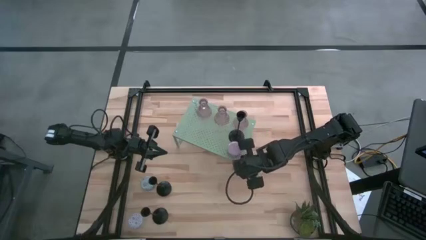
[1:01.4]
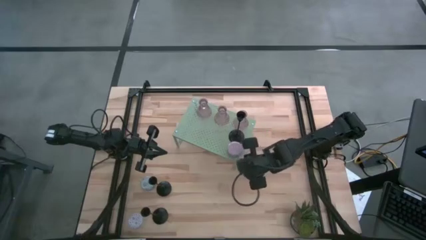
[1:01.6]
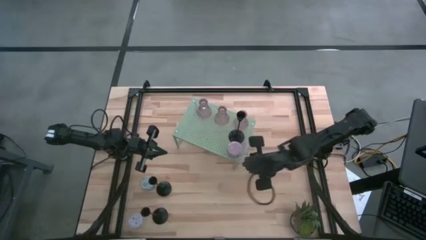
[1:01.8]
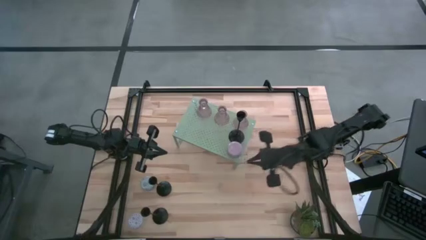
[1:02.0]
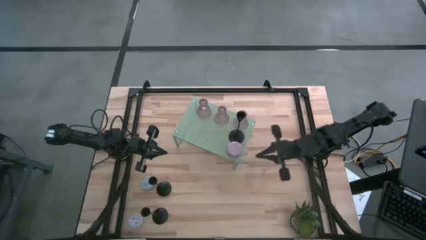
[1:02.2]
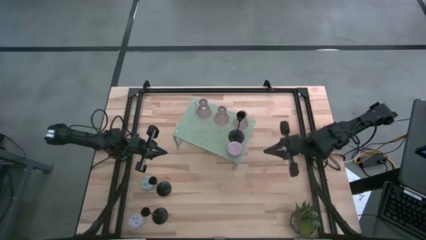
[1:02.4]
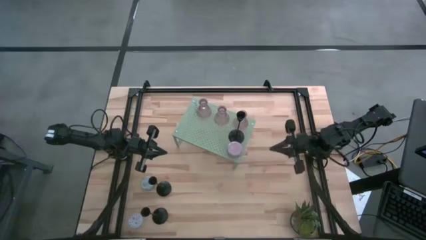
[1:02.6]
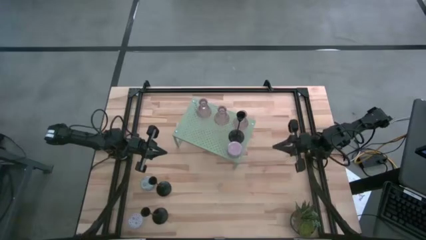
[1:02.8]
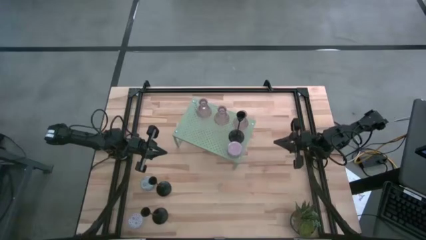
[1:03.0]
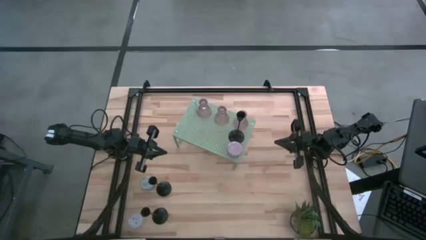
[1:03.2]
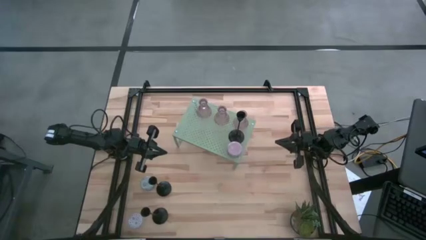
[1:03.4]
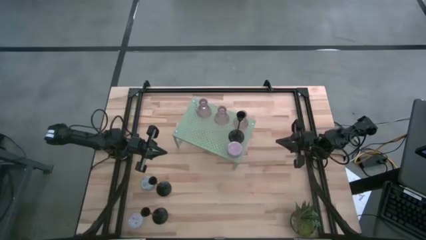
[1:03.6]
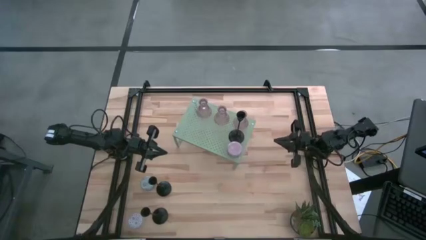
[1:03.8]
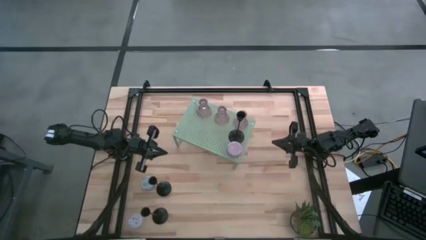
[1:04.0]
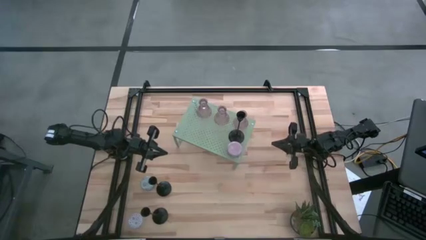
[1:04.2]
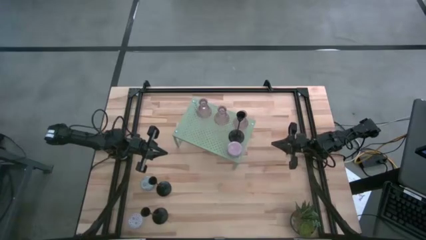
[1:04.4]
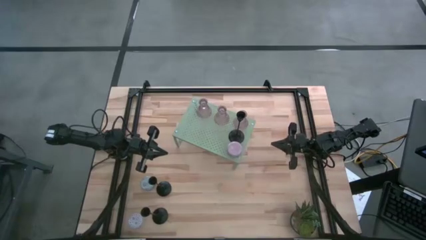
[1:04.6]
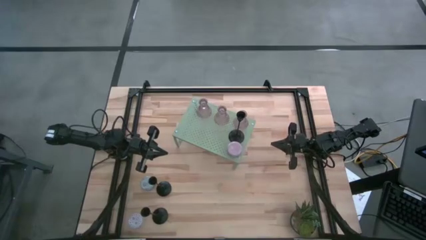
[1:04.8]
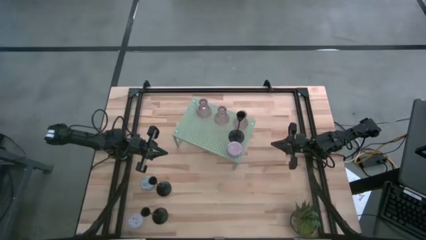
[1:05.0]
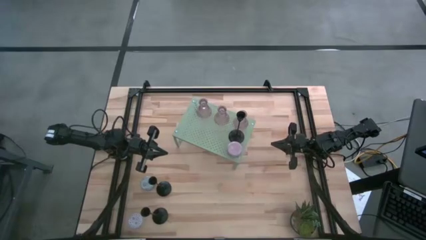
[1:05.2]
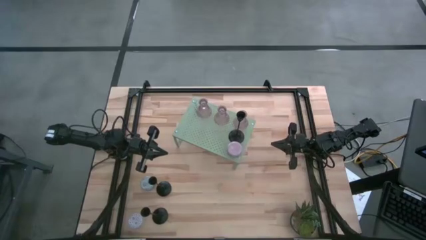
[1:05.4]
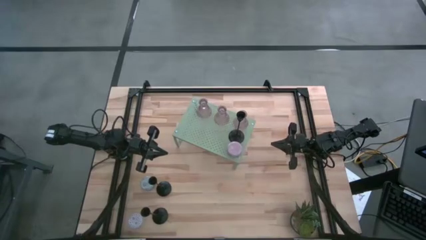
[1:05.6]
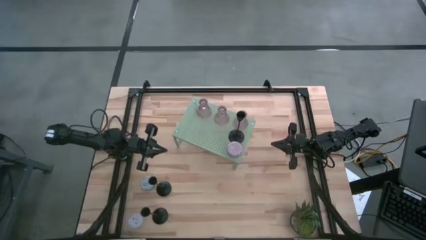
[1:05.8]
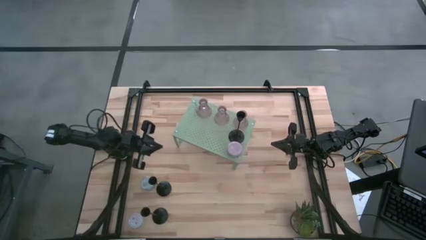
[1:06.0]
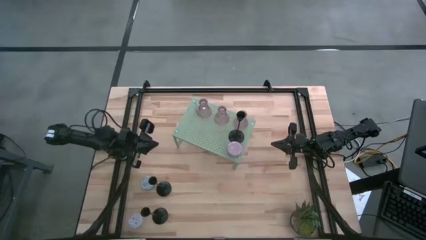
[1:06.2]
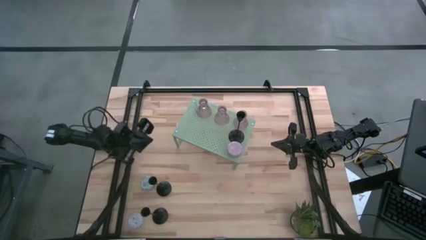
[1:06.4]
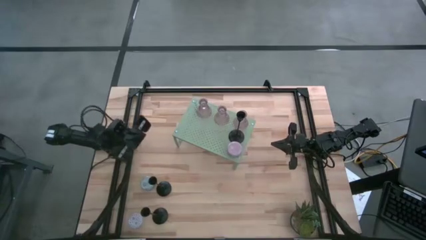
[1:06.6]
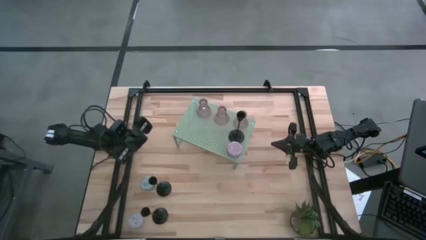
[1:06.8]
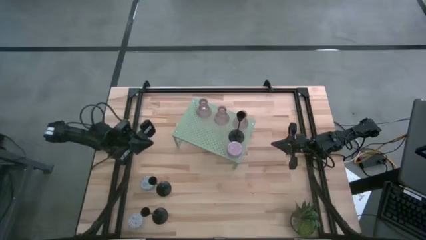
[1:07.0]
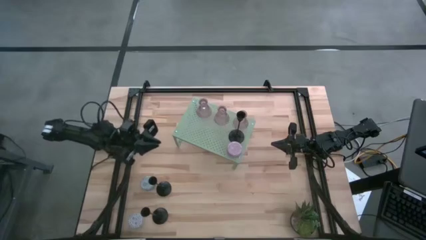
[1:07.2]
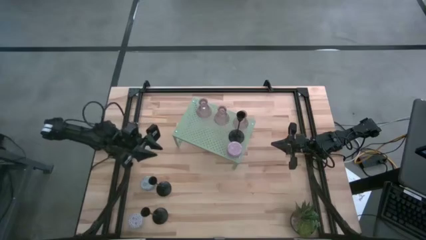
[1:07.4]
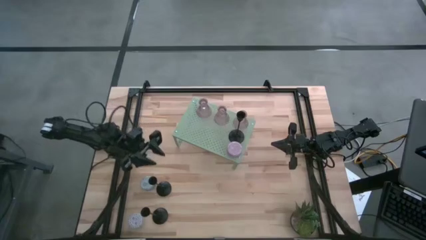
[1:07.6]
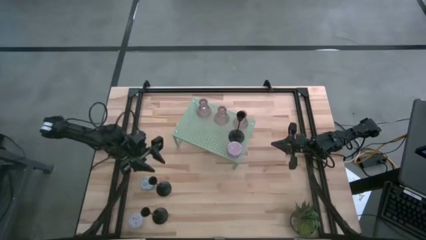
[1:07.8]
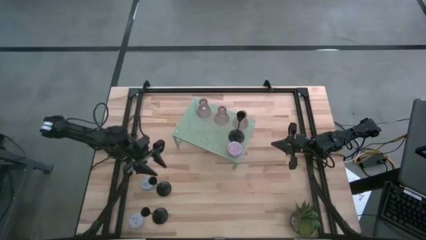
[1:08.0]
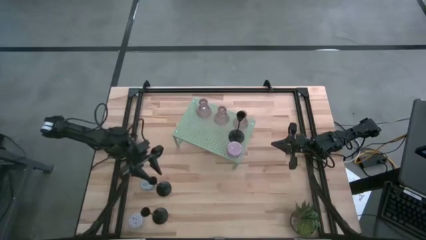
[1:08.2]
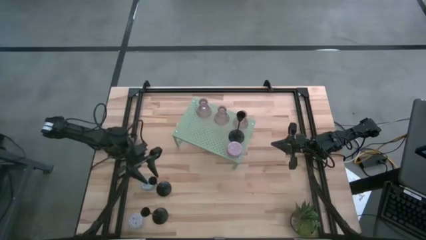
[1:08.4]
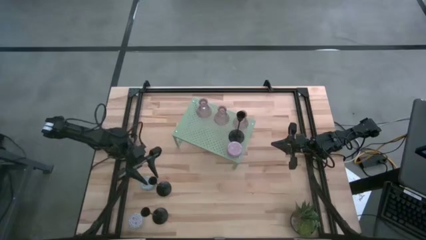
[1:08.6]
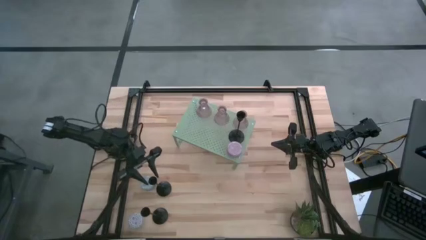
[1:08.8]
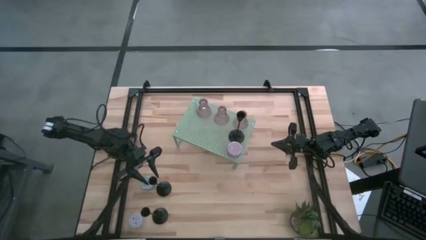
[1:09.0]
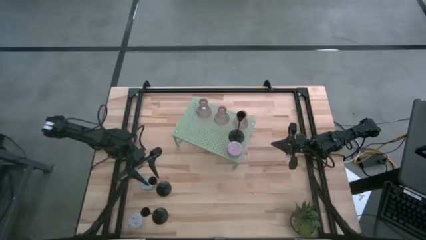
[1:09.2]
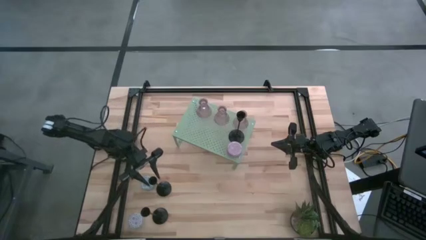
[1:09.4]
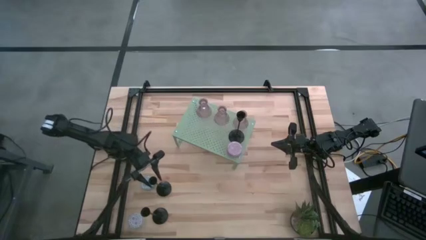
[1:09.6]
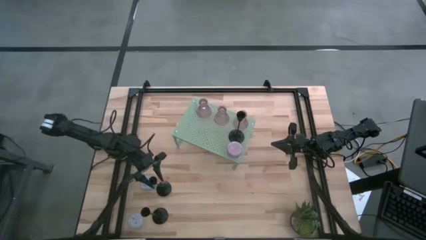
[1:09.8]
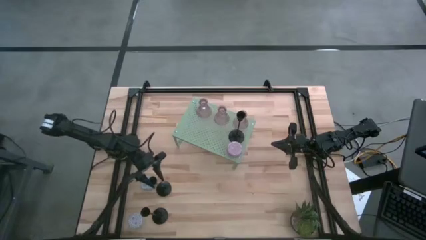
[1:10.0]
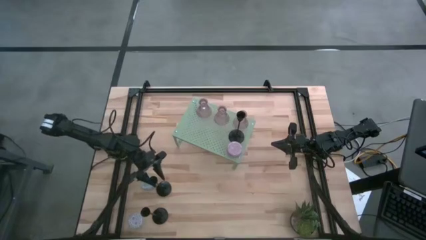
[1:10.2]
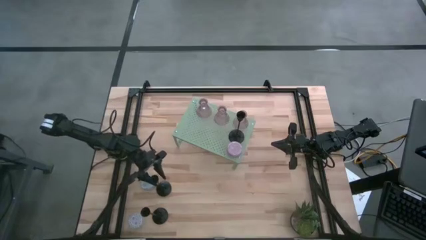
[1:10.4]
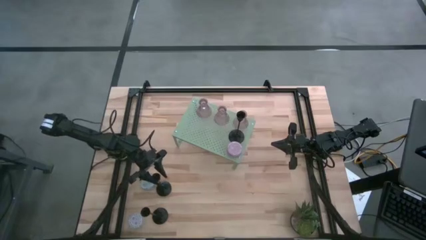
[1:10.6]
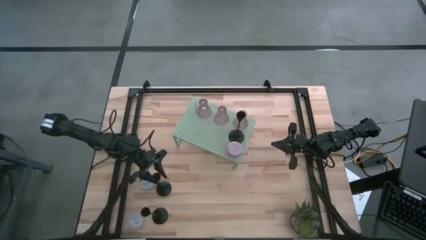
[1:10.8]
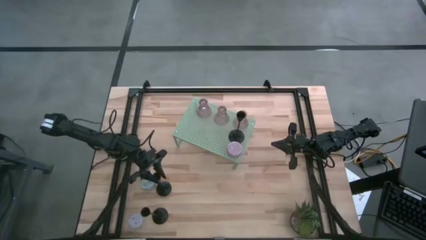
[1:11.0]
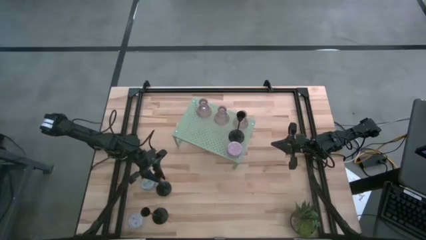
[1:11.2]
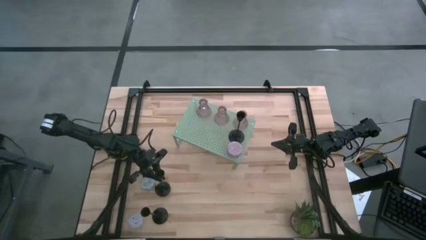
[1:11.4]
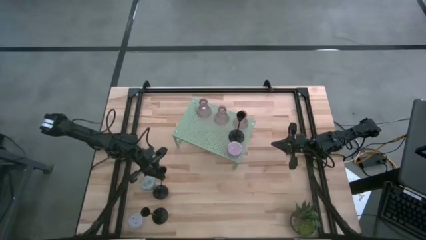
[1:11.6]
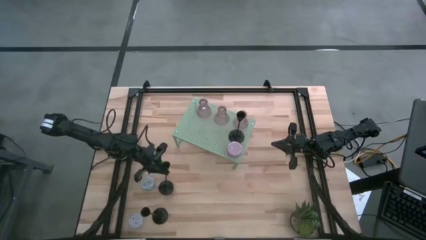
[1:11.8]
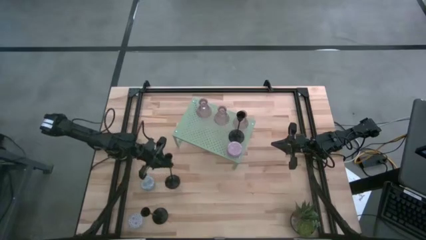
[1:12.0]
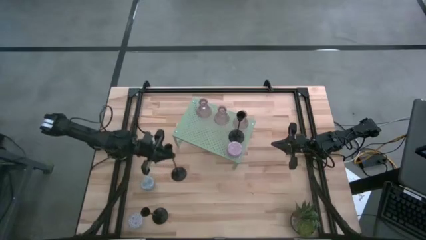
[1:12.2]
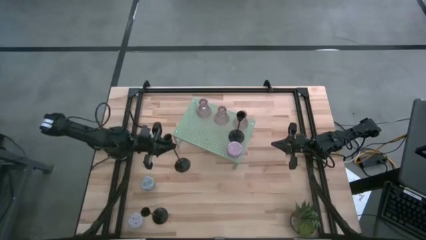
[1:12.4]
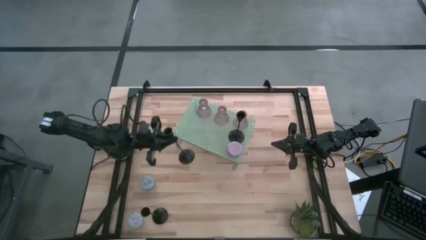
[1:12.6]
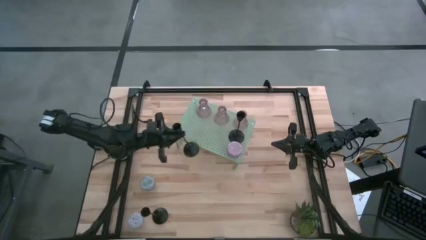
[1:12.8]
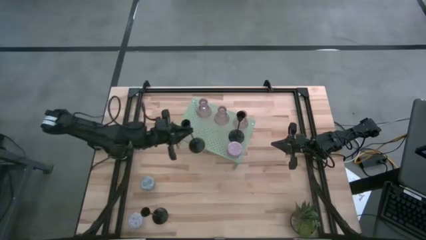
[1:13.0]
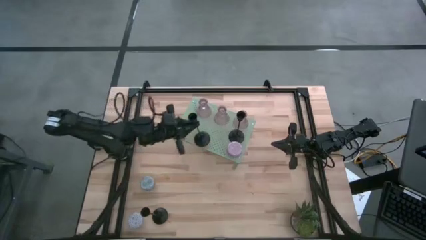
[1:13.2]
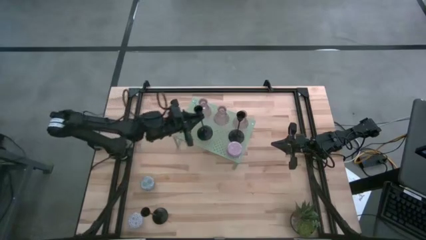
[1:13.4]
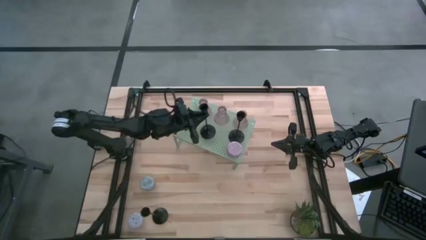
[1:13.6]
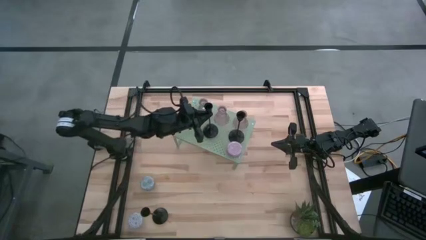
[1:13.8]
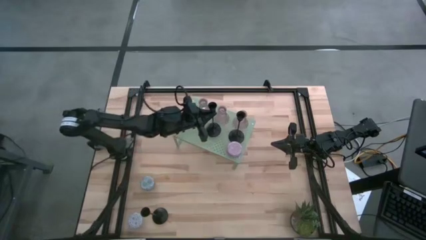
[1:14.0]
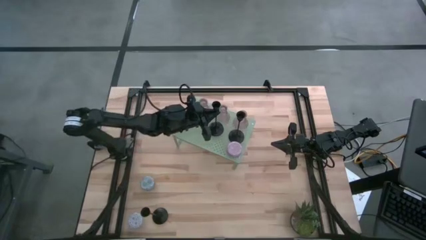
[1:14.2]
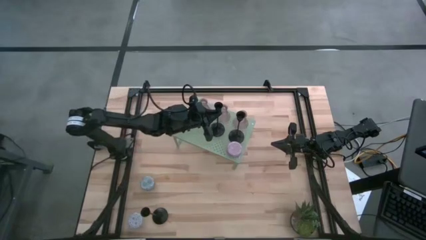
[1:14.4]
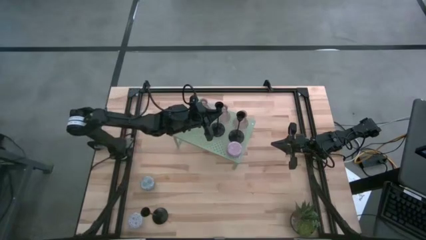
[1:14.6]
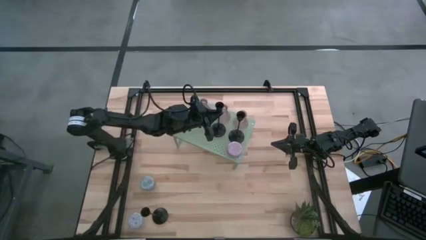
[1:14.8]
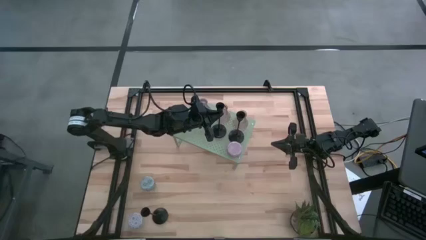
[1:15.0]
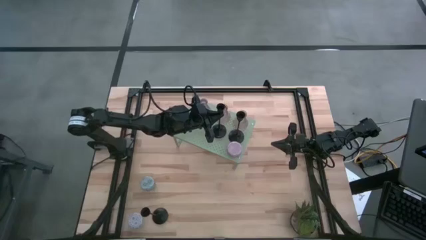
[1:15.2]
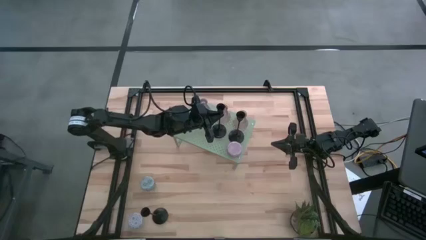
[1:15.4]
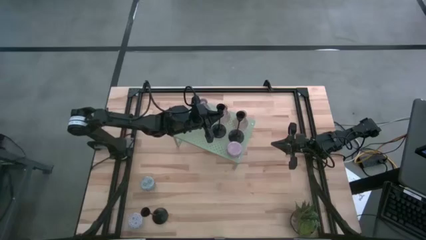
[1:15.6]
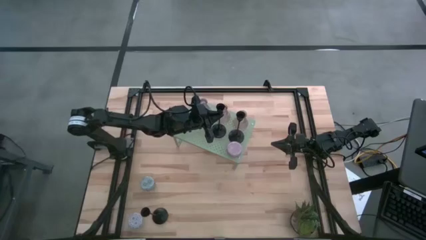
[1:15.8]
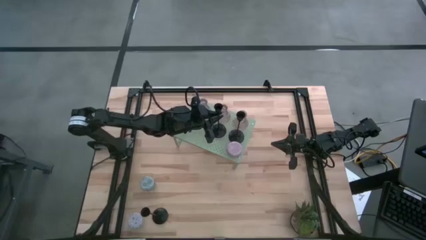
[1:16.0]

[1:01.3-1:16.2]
Task: Pick & Place candle stick holders
Put the top black candle holder on the shelf aligned with the other black candle holder
